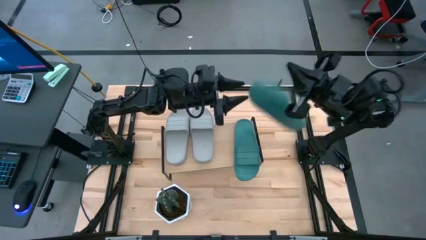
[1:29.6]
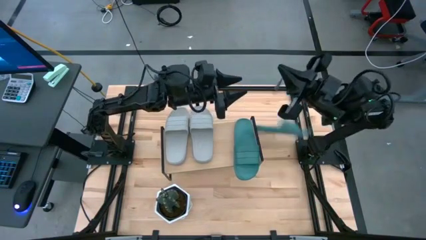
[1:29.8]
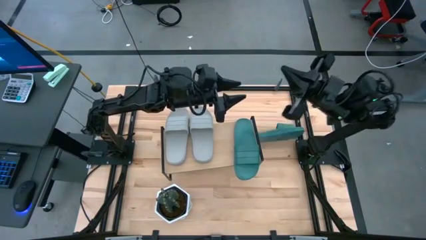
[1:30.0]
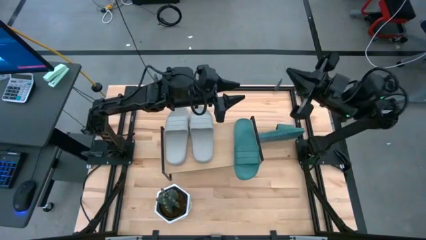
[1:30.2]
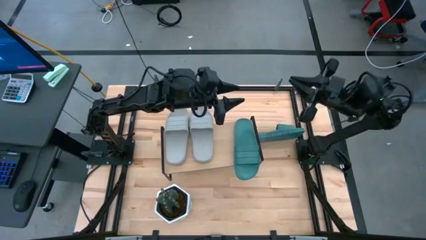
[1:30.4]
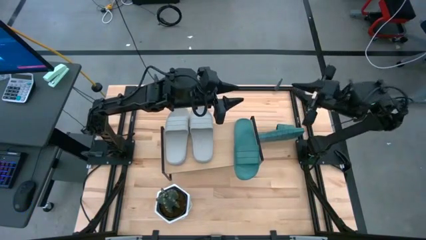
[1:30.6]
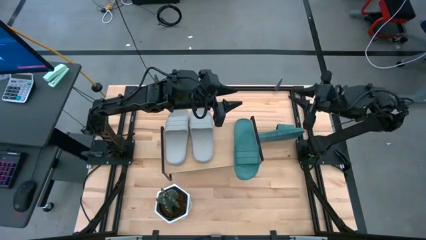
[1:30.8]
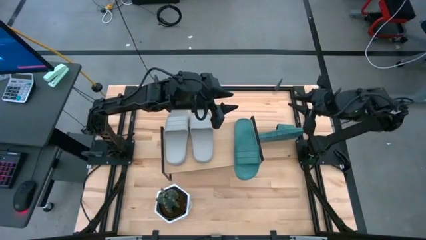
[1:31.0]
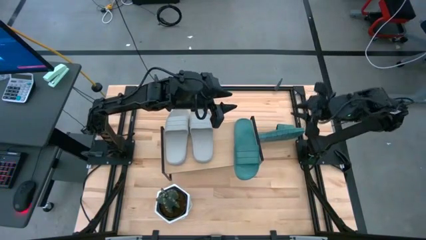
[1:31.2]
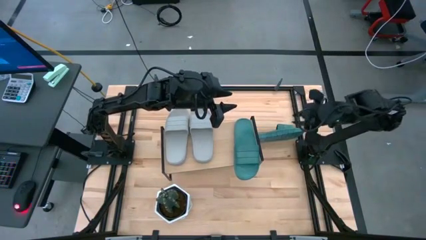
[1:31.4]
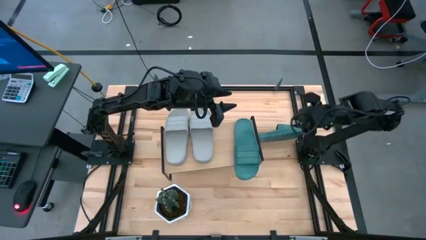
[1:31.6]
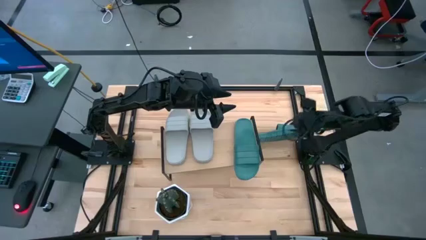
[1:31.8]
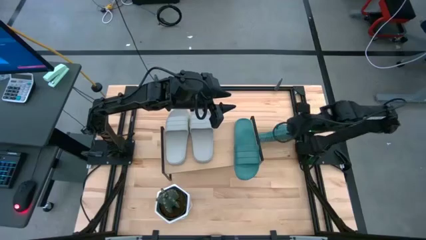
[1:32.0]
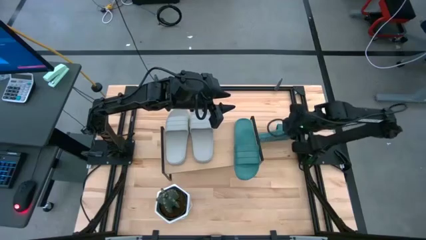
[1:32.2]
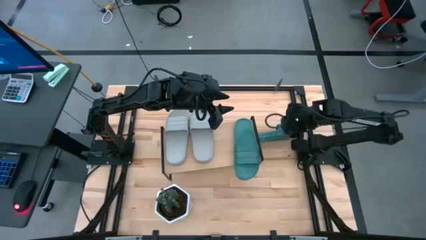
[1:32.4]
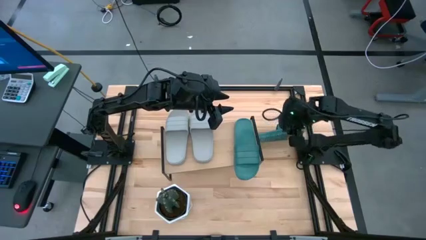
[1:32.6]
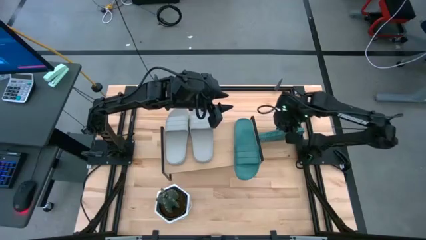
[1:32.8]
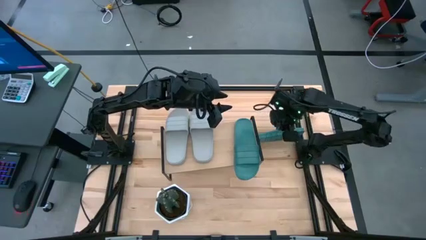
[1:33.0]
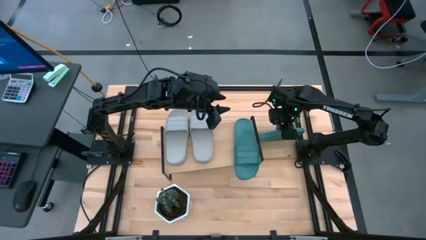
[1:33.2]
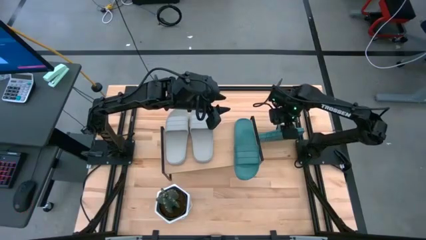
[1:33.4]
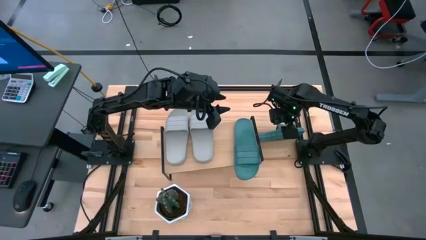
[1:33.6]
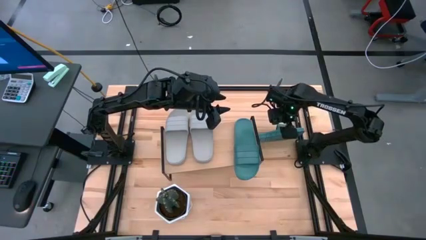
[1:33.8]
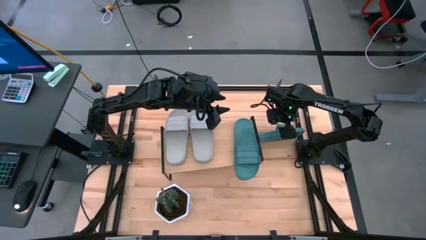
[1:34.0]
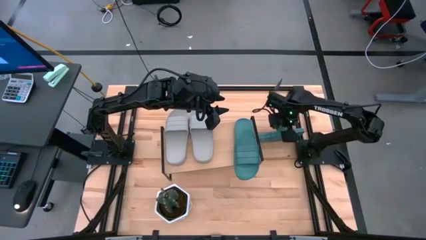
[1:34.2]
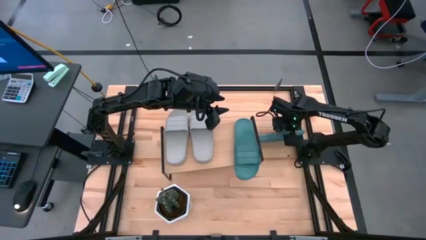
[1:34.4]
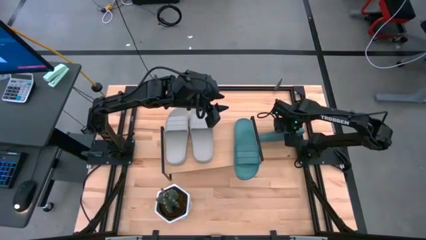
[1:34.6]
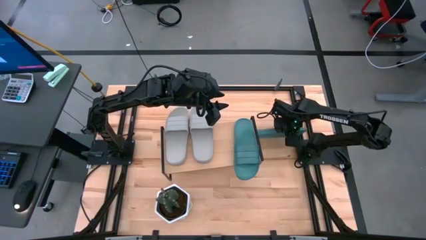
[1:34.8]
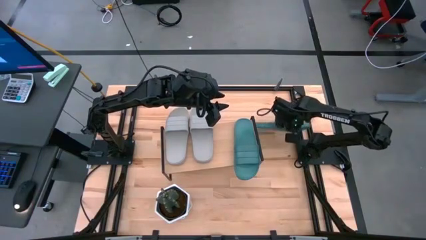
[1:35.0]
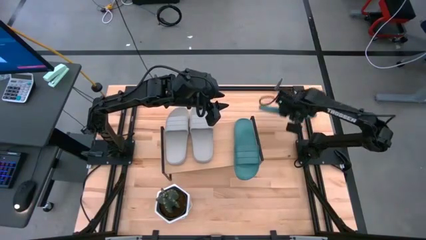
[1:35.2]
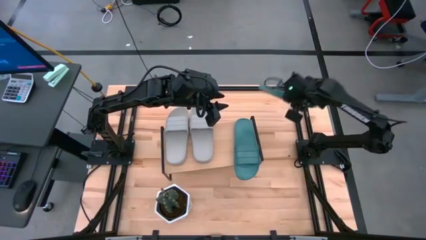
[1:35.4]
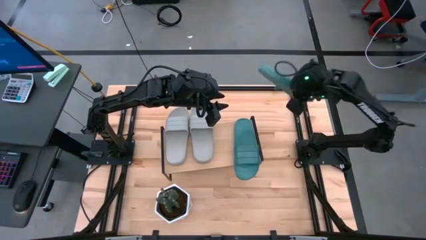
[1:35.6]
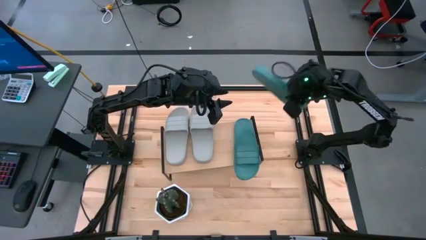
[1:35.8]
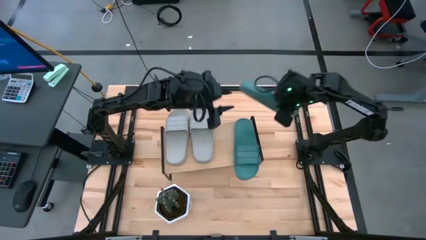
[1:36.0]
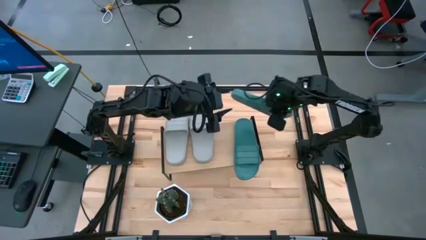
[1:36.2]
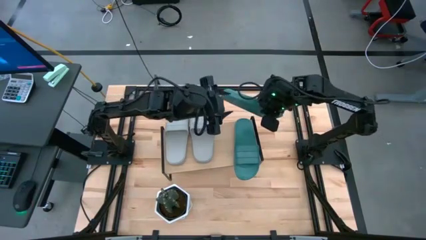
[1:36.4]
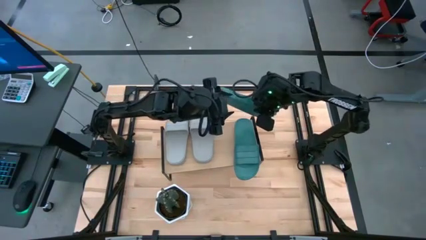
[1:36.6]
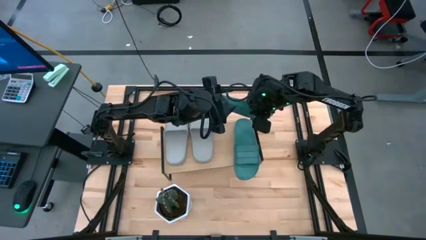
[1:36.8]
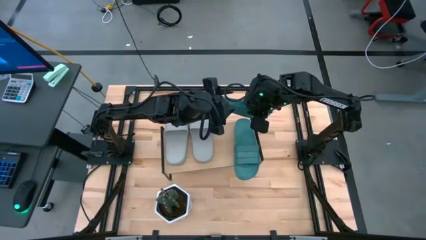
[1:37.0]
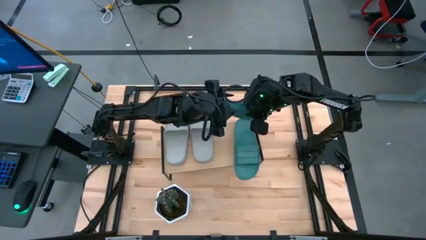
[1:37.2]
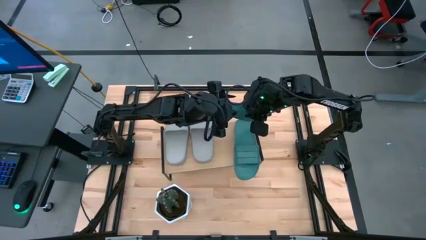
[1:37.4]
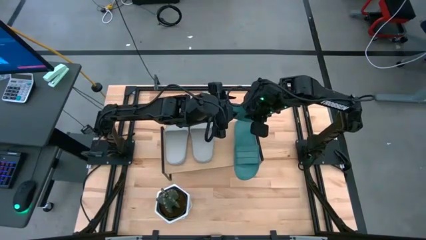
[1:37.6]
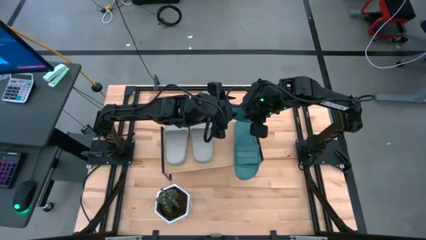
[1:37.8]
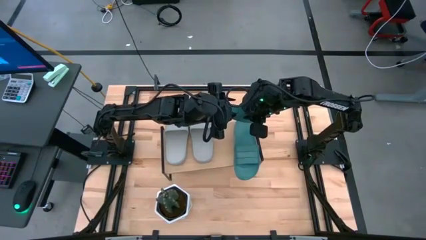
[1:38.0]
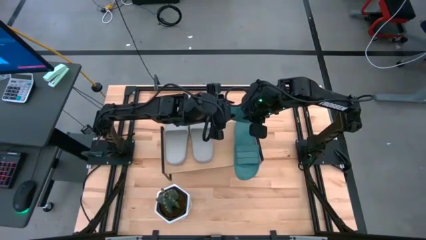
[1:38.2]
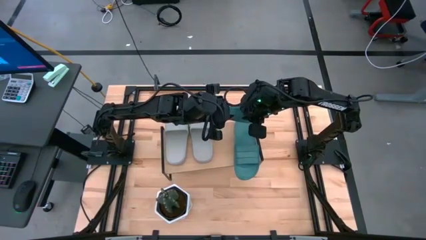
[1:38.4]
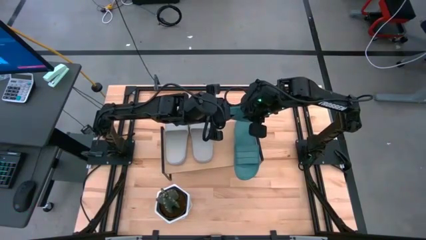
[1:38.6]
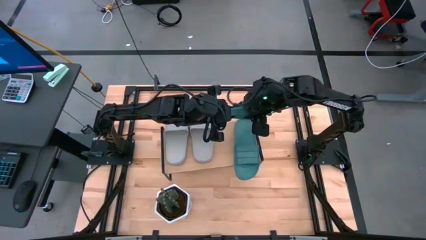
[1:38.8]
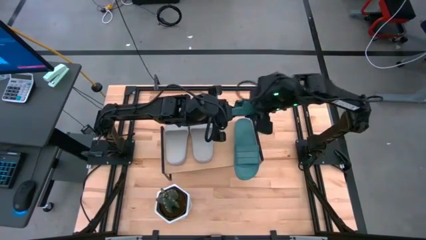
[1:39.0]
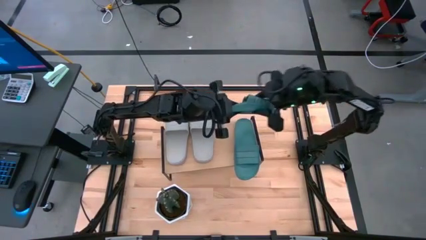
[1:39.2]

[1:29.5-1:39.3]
Task: Pick and place slides into the shelf
Put the green slide on the shelf

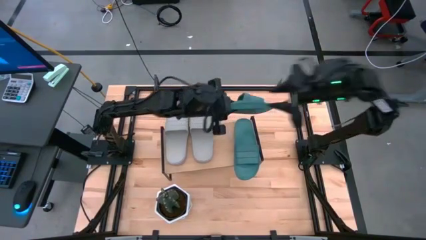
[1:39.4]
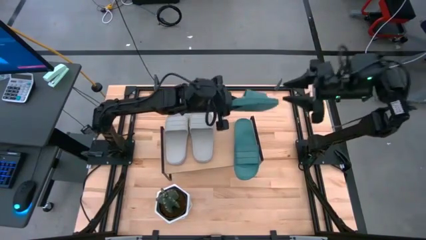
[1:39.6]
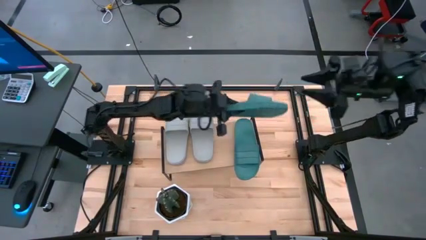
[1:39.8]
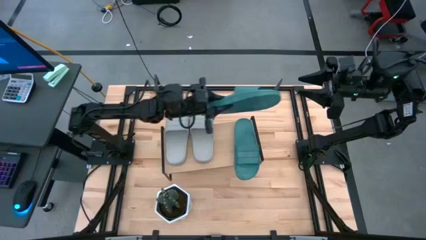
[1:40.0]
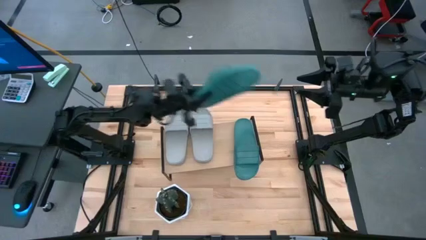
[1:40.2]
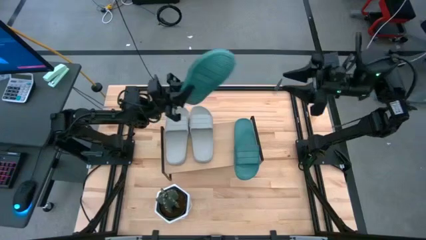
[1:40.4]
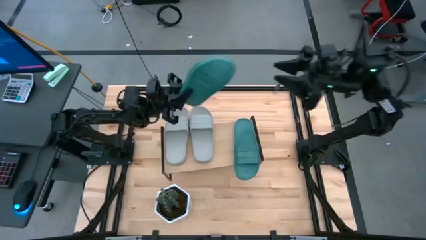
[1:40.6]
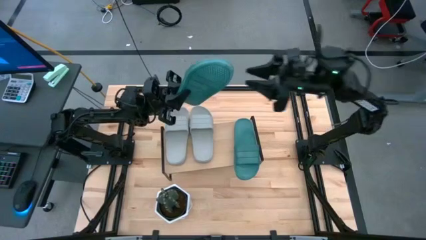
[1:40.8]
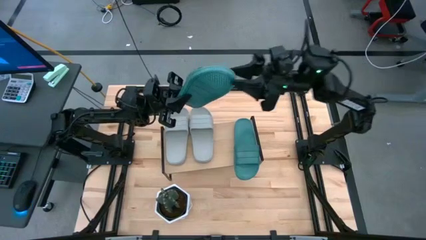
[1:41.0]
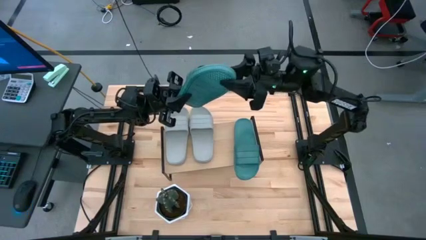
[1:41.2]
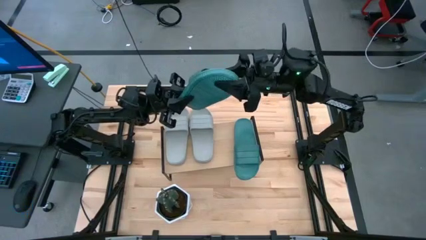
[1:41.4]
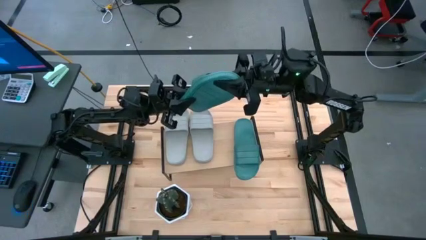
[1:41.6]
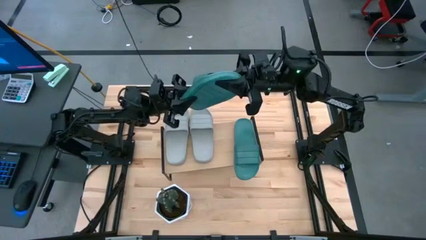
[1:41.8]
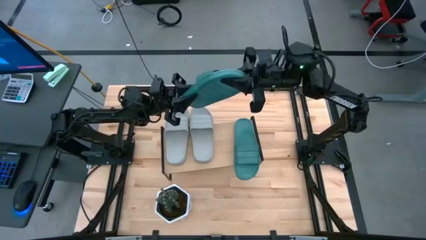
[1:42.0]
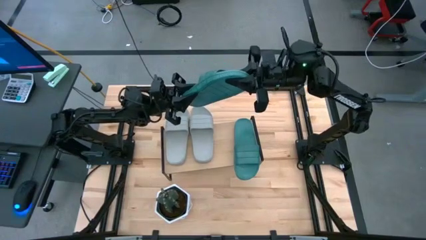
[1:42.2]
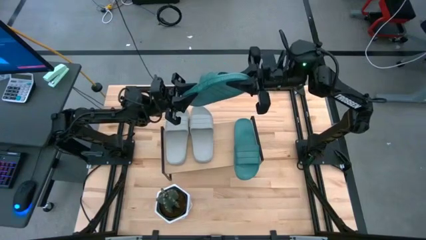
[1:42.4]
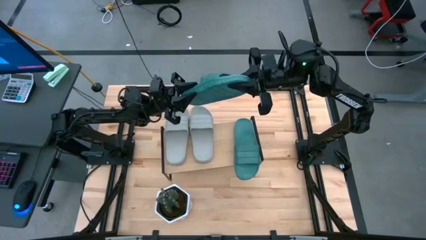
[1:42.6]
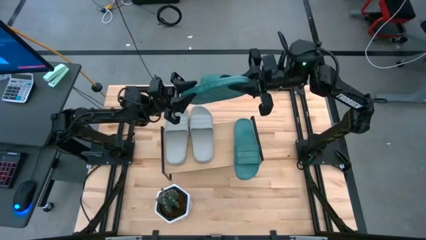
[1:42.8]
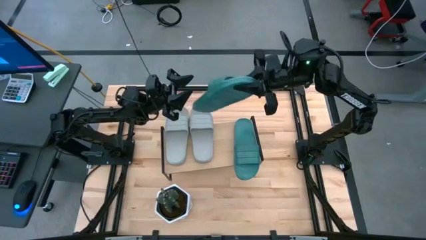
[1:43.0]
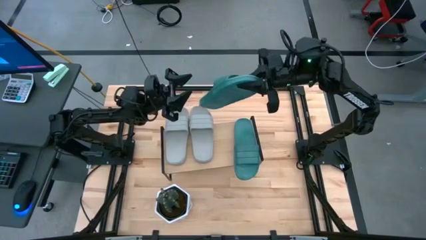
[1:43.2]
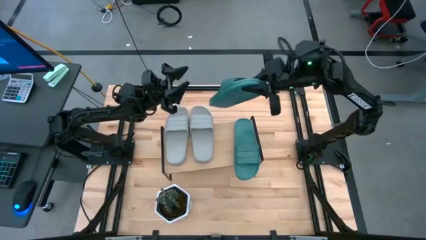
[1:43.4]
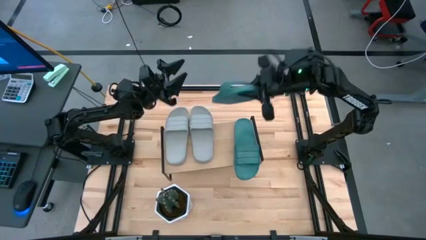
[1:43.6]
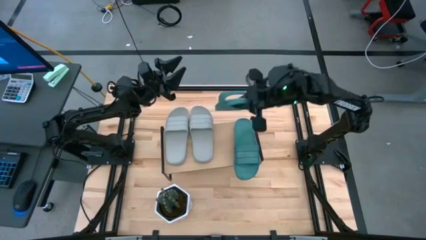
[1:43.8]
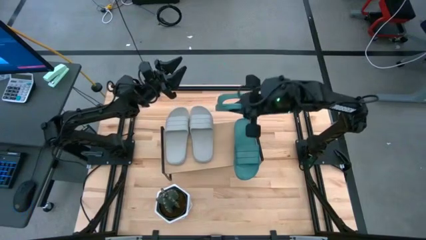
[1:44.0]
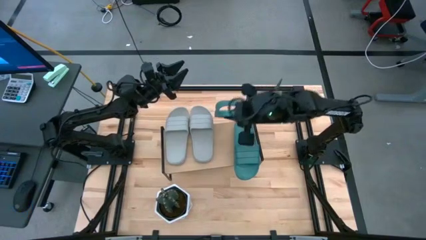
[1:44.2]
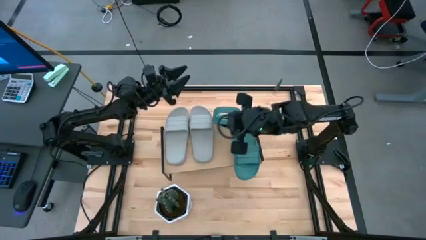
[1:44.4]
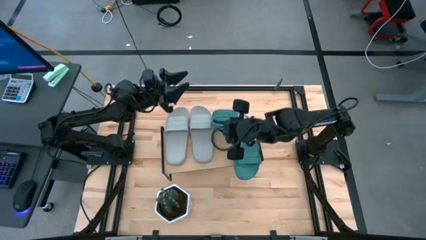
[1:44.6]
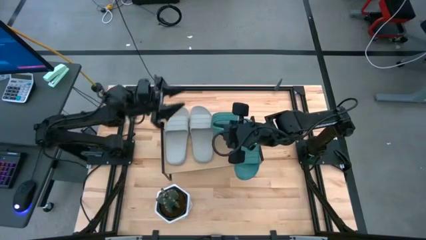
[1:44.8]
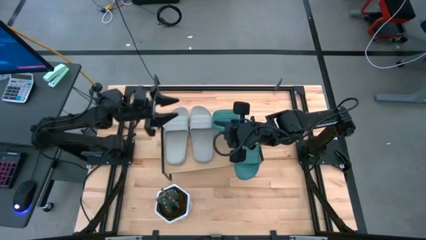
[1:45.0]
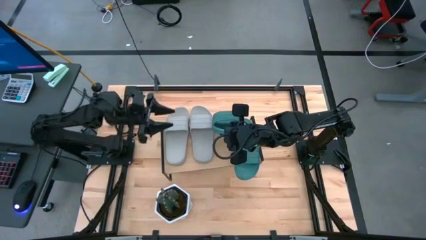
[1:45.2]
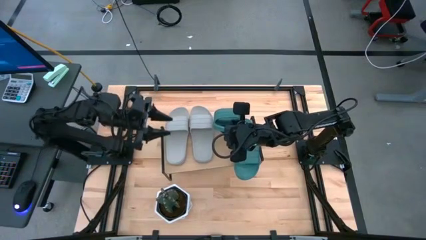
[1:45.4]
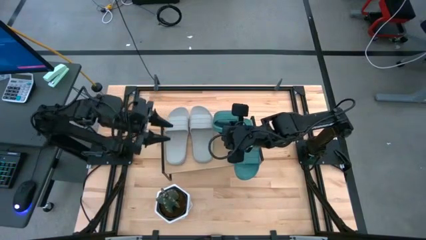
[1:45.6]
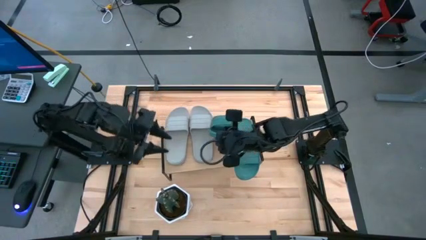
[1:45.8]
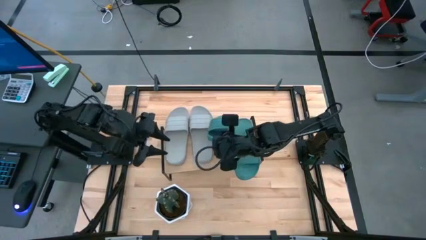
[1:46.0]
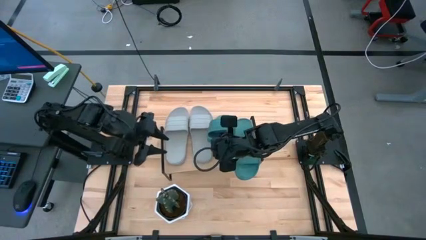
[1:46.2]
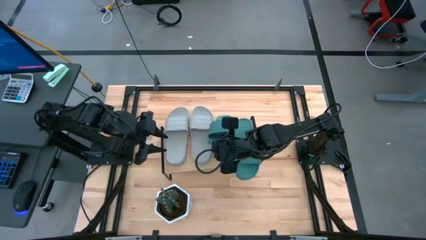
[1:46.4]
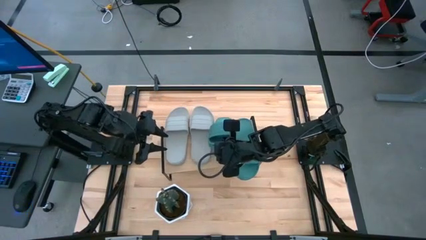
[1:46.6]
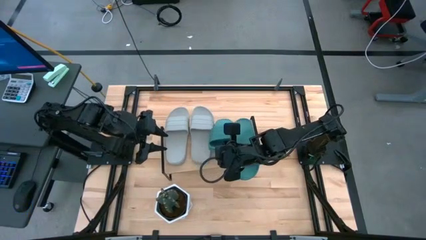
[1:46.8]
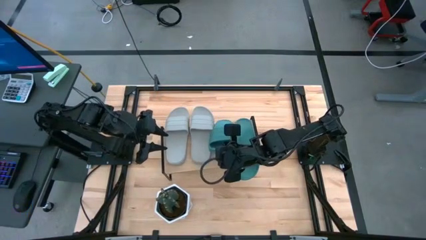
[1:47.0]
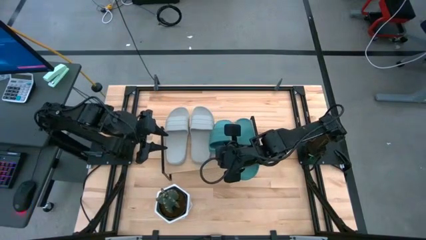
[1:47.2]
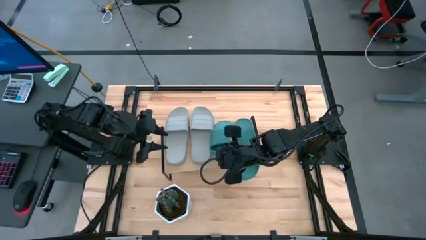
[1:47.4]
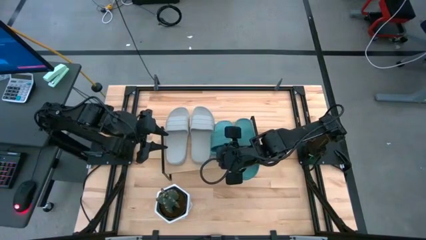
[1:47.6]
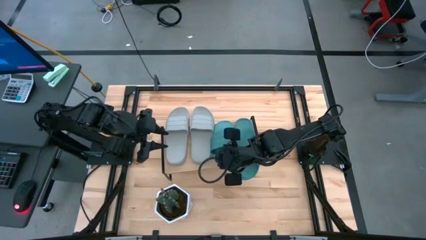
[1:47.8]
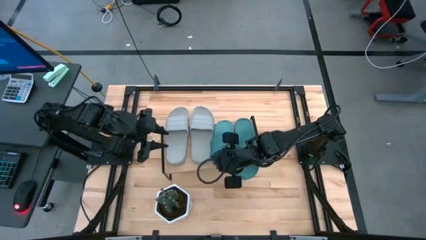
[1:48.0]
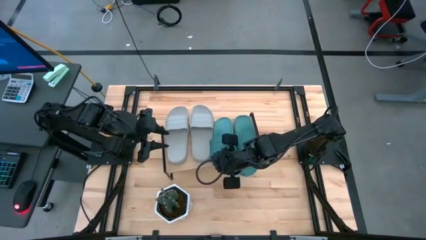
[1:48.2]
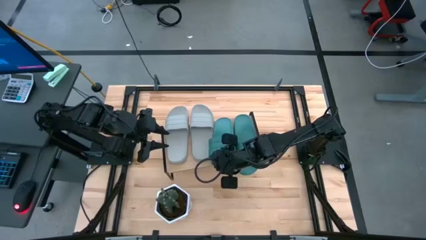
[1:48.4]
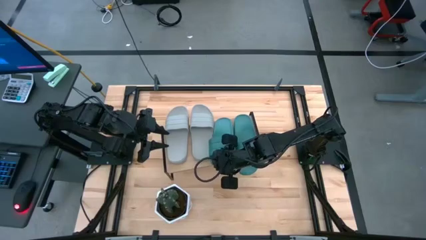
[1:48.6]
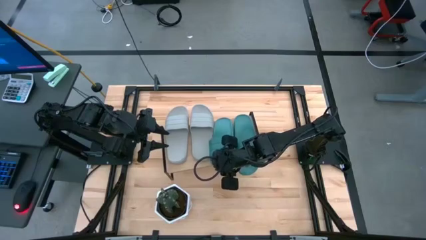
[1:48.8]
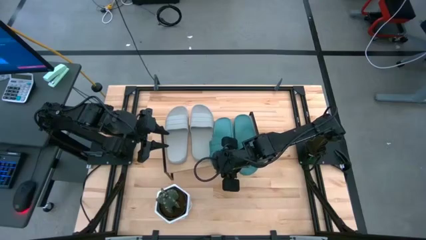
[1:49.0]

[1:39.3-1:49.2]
Put the green slide on the shelf
